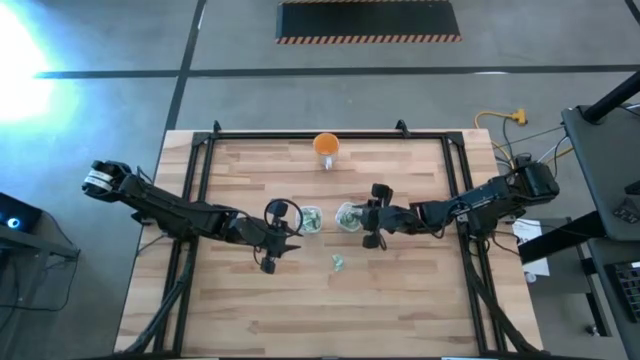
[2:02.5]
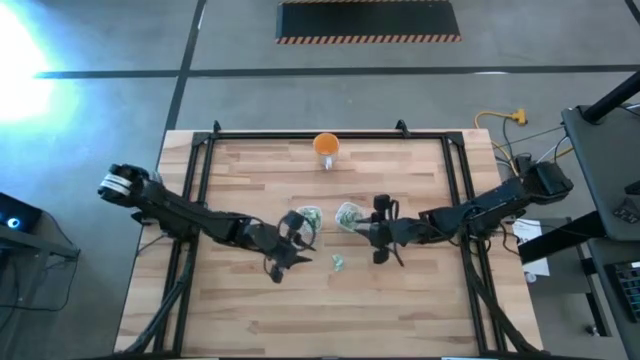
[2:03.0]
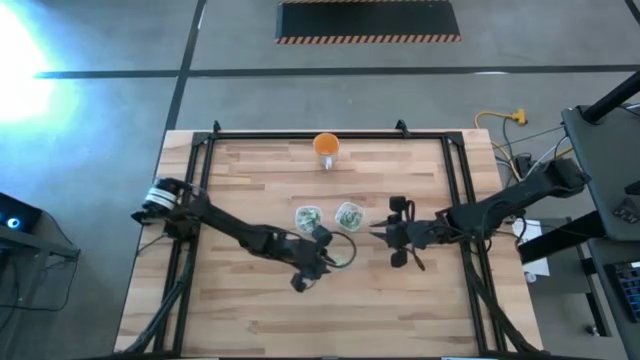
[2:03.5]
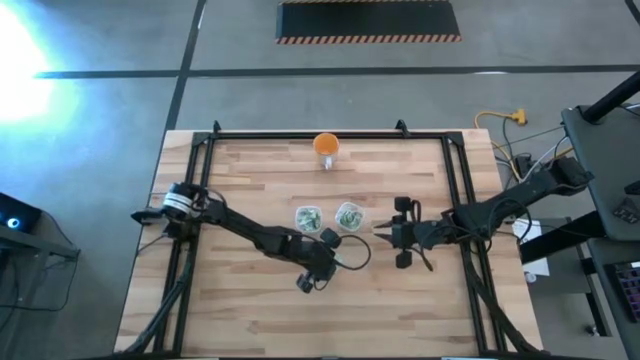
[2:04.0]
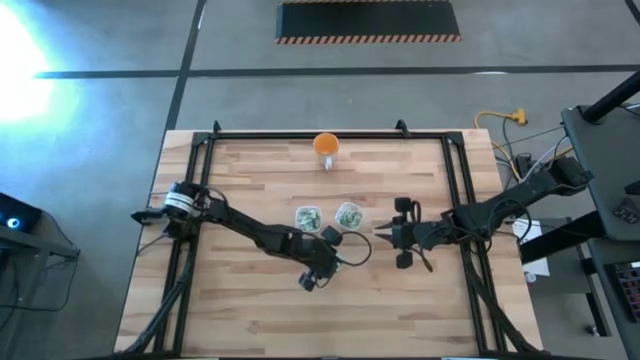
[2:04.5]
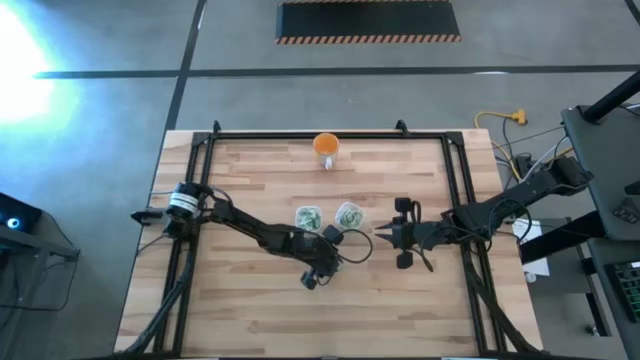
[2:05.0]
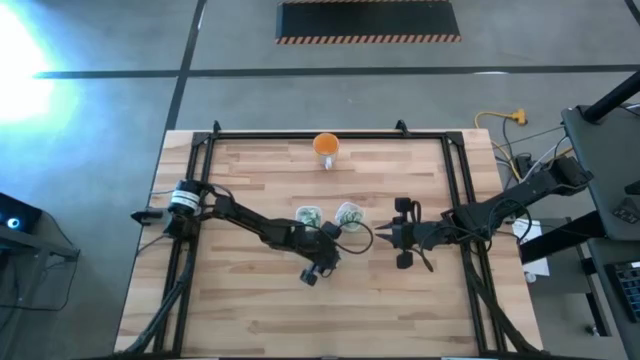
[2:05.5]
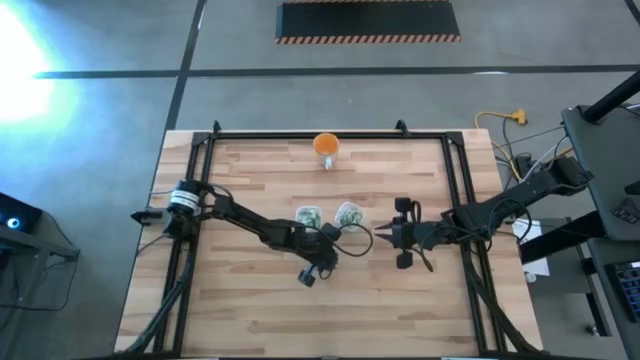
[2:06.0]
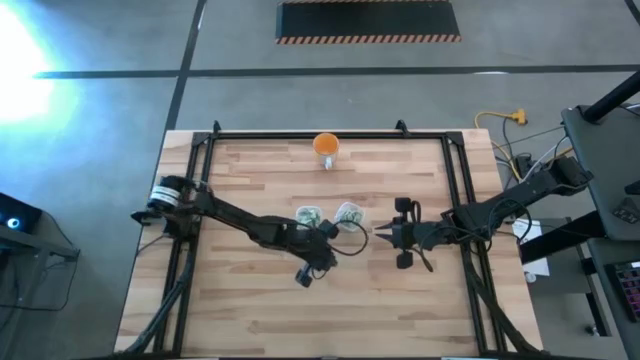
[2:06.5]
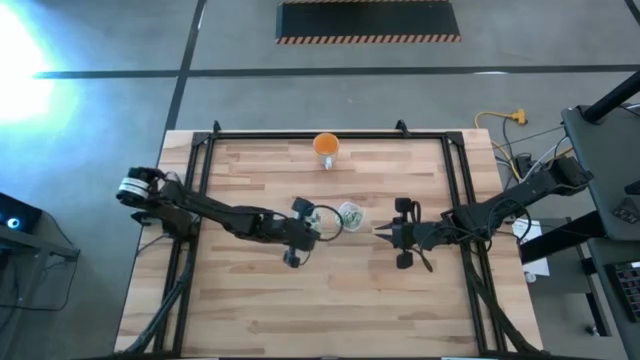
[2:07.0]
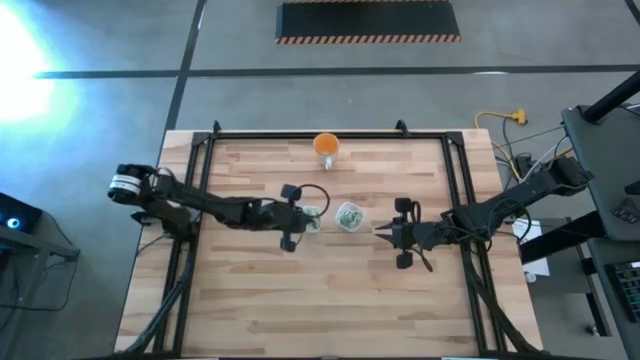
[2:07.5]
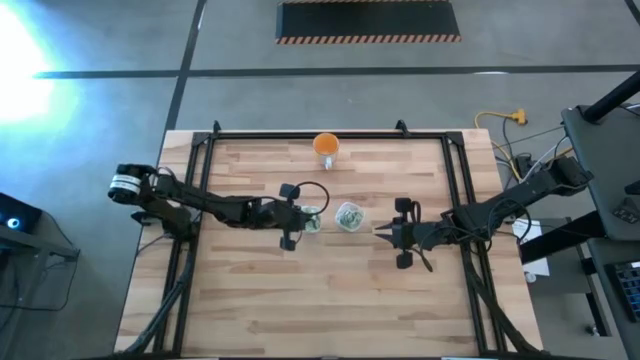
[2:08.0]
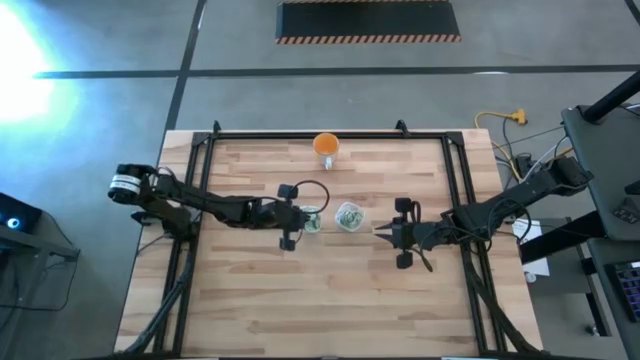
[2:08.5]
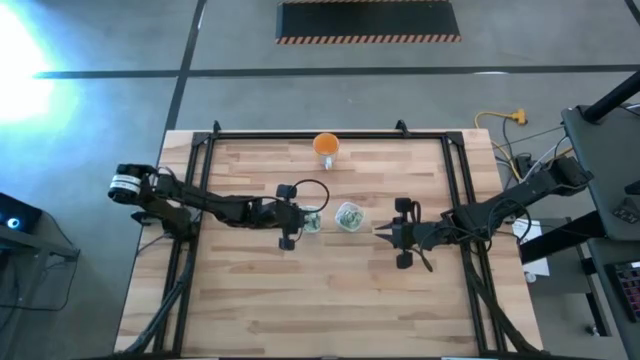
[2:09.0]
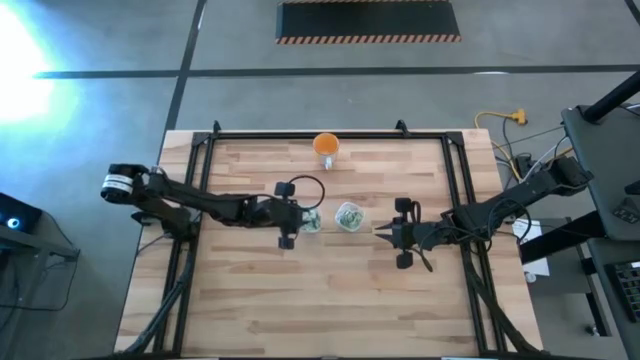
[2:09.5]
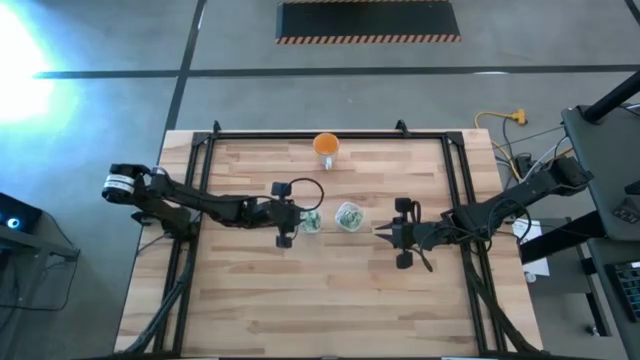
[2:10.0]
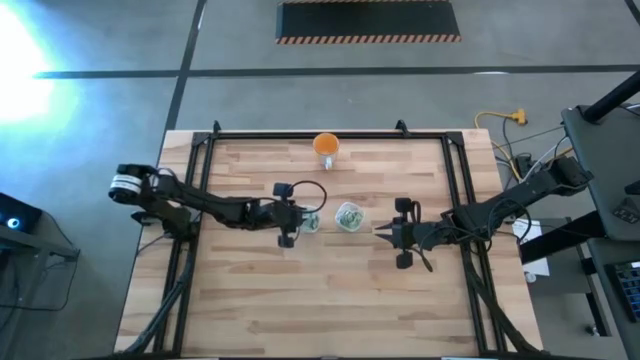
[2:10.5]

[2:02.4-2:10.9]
Task: Pick and place Stevia / Truvia into bins
Put the green stevia packet into the left transparent container

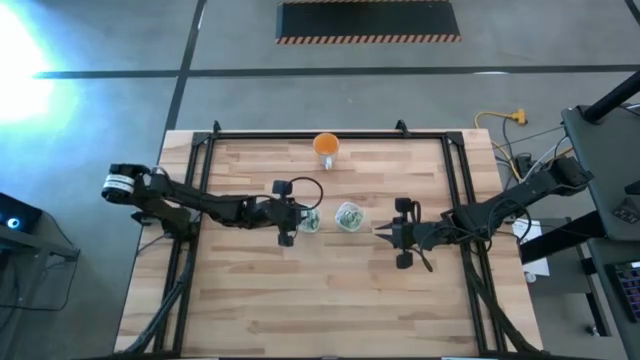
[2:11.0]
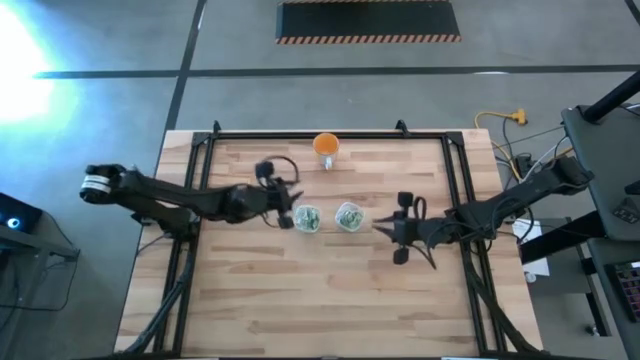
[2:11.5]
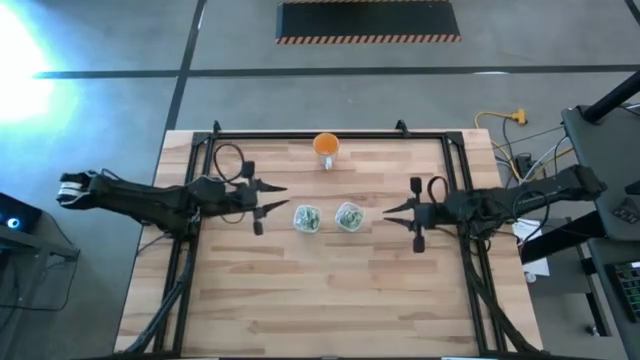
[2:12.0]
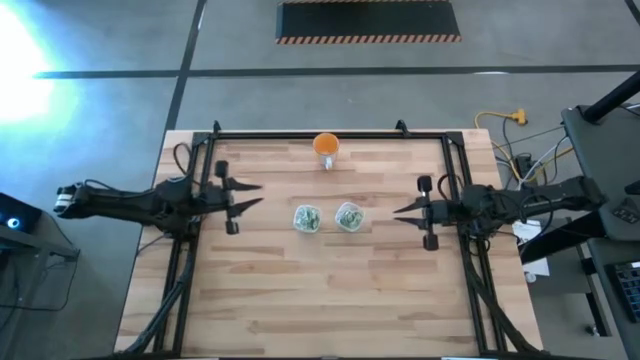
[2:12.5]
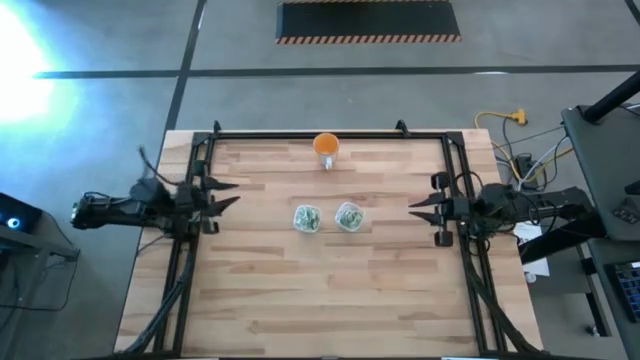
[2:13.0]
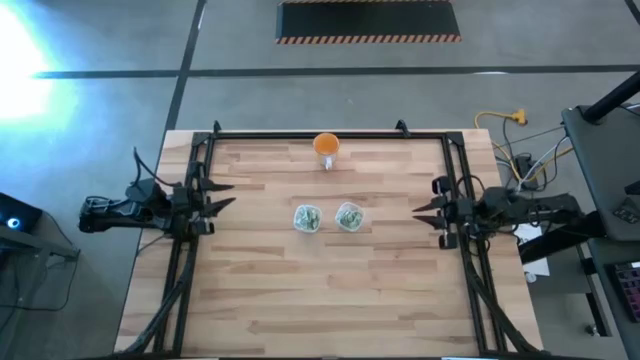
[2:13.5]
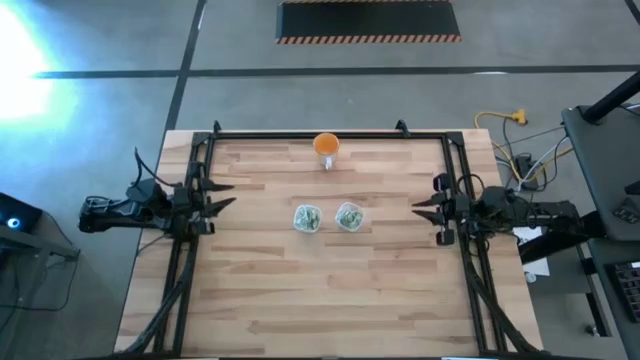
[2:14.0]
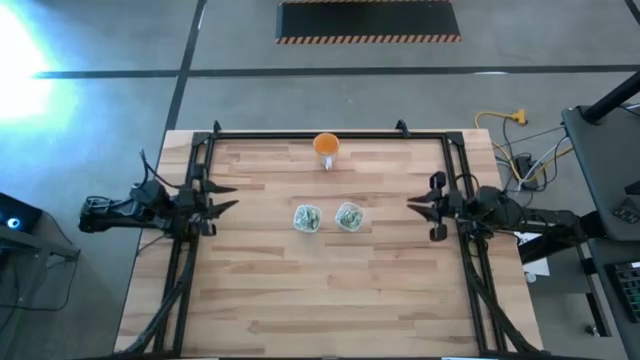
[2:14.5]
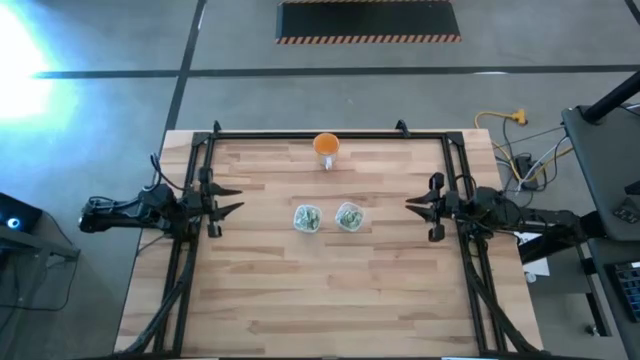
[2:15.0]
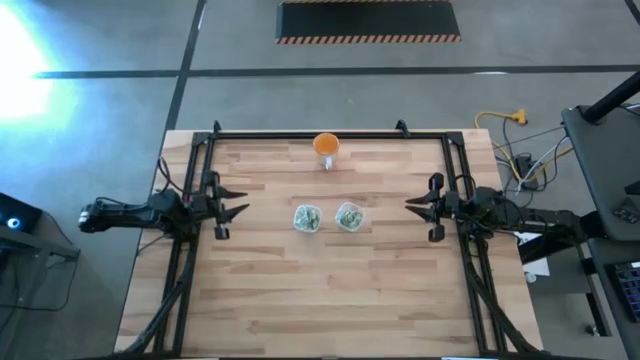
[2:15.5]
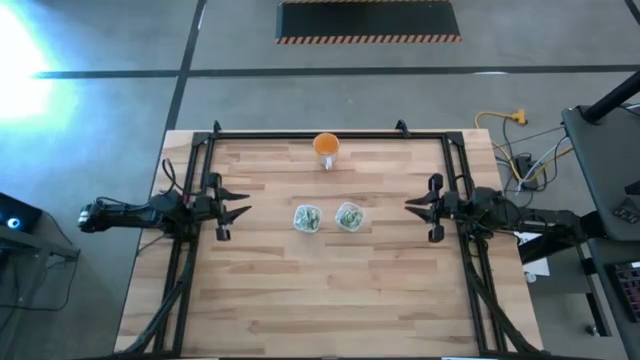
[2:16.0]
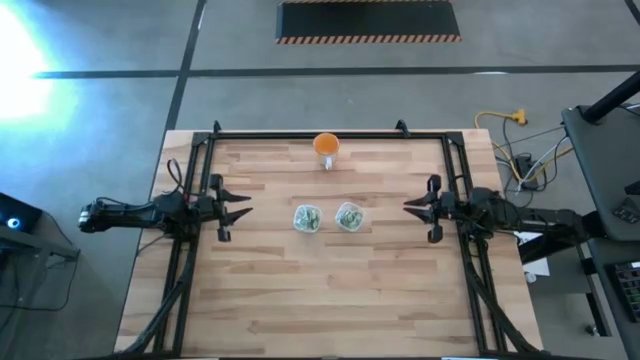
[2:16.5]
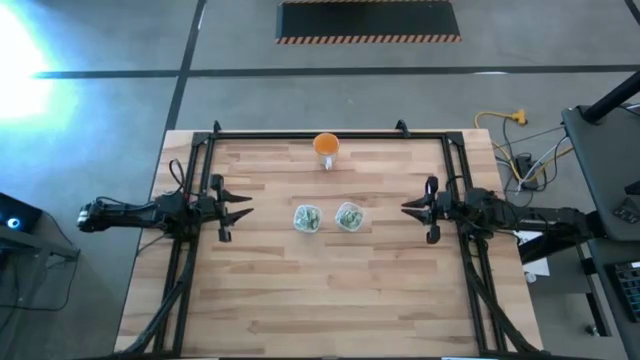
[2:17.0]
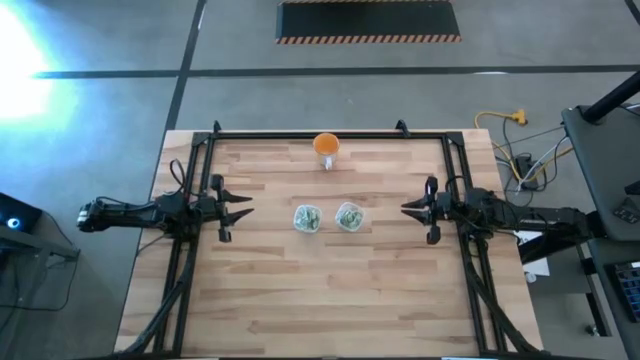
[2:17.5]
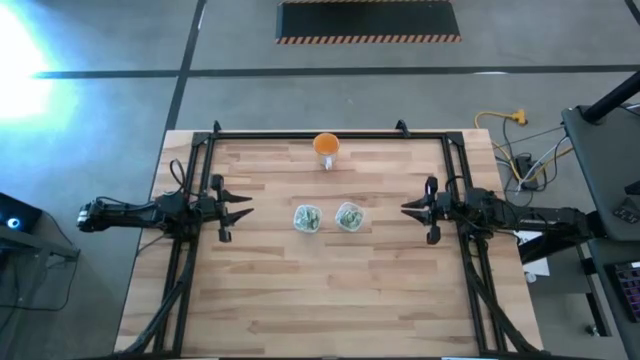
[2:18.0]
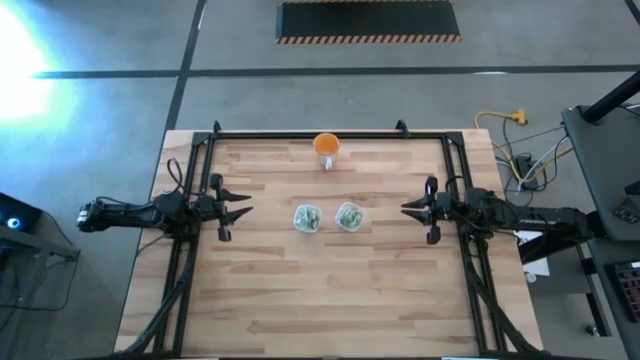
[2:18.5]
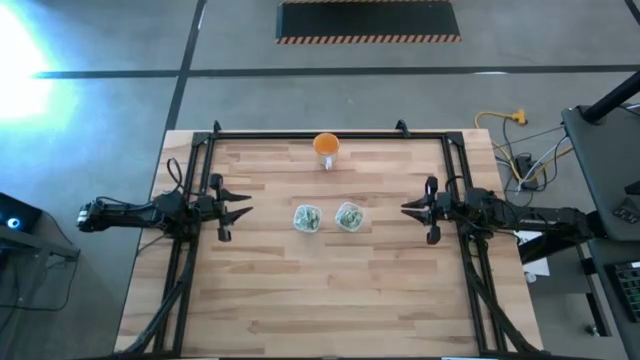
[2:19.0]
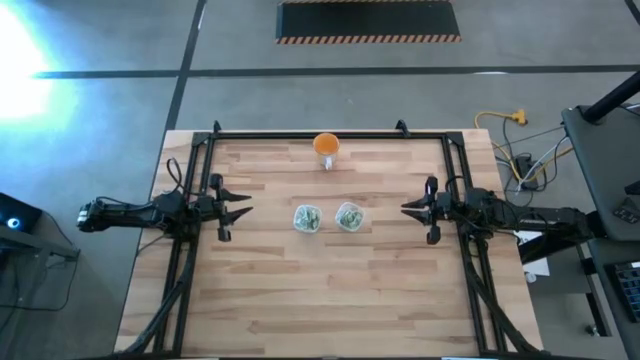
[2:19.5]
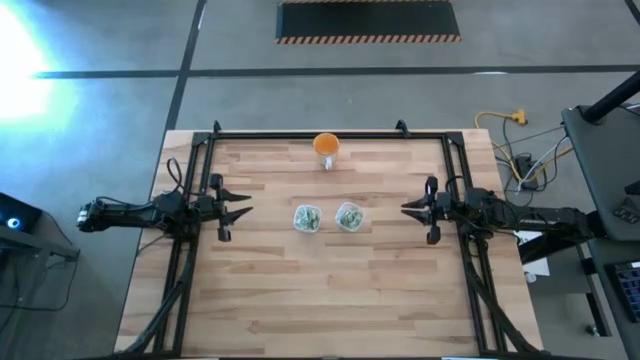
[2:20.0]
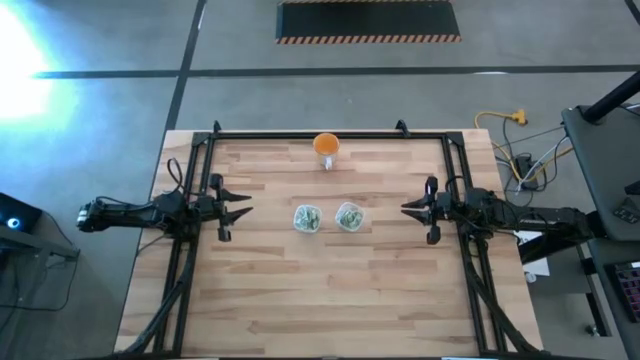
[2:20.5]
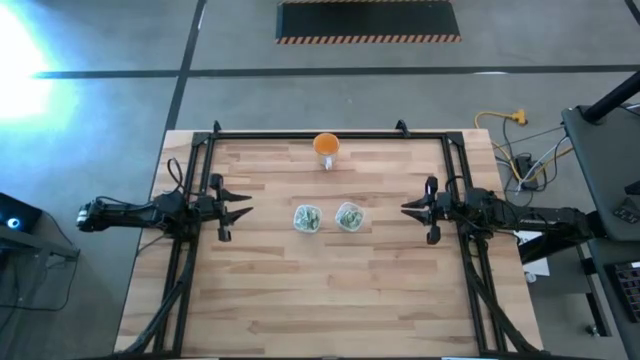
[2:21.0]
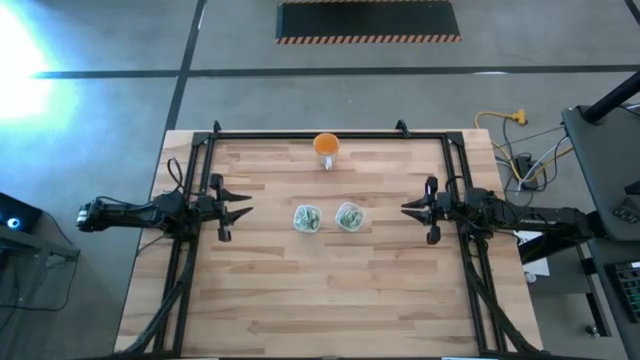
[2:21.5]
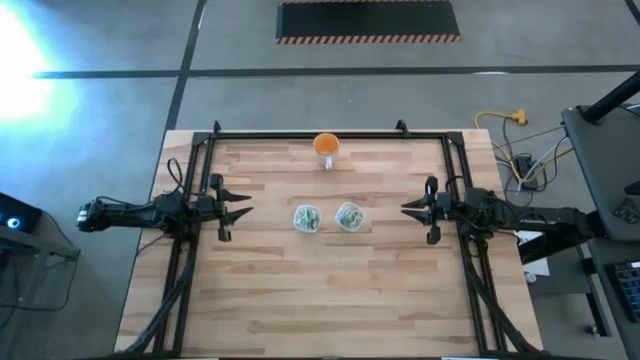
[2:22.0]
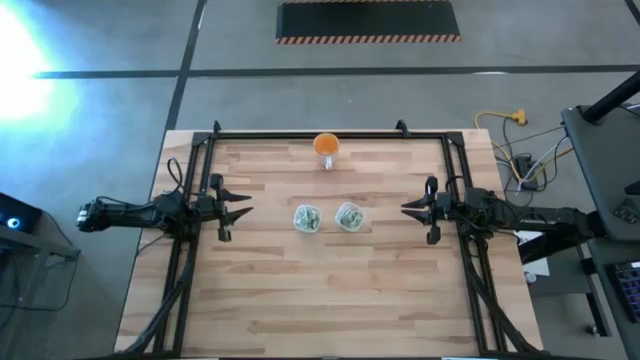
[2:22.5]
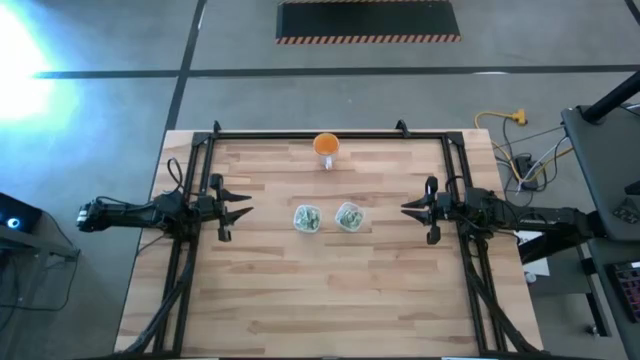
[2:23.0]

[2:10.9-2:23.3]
Return to Home Position
